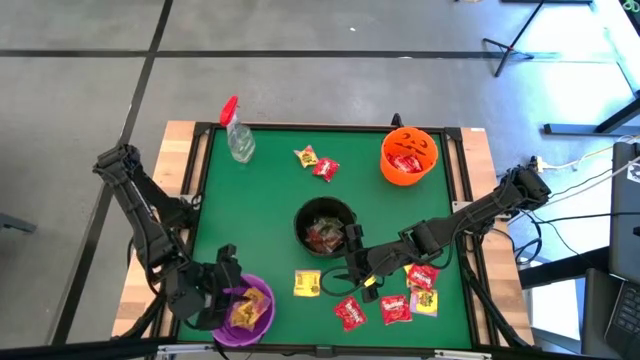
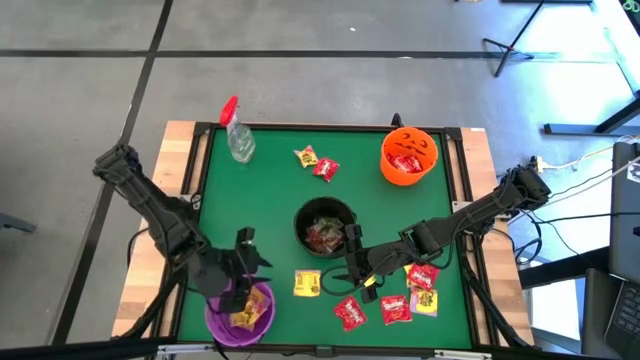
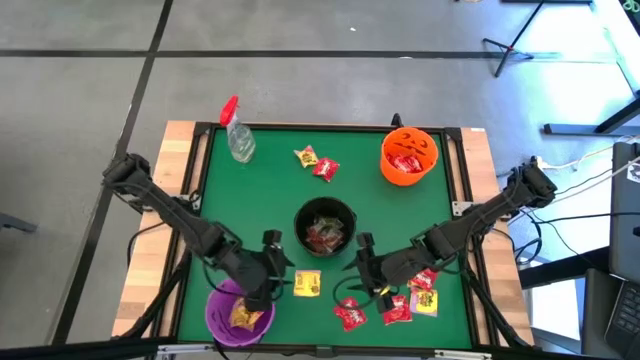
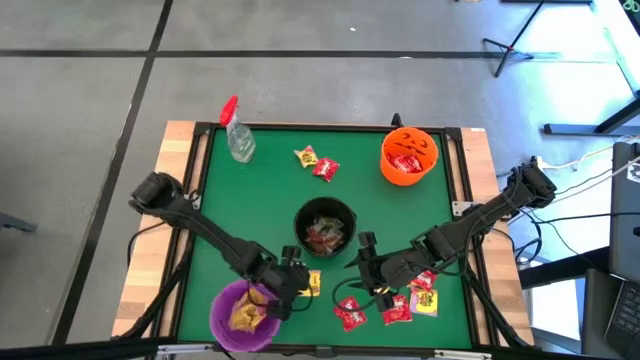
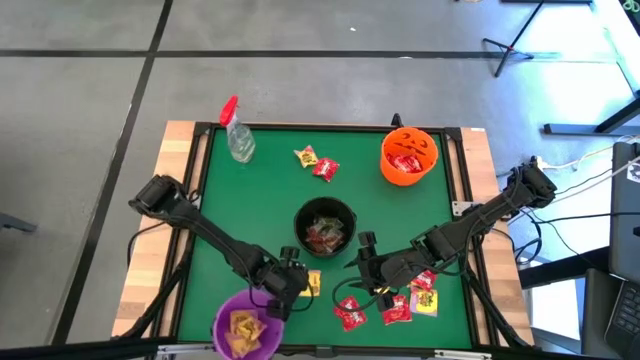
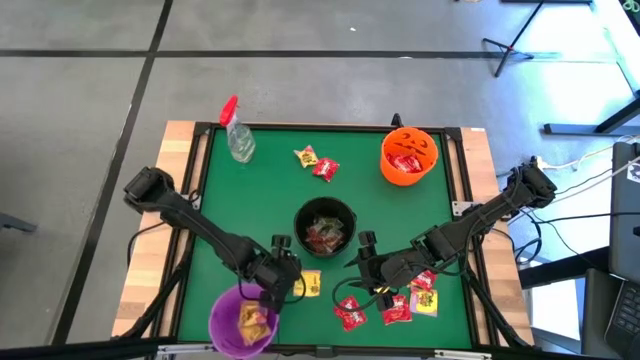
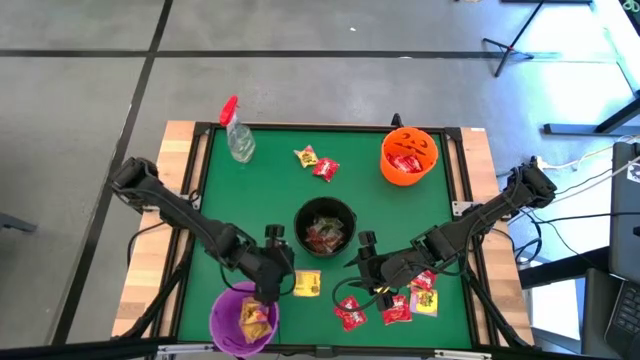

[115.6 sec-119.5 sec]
Task: Sort candy
Put the yellow candy into the purple bucket

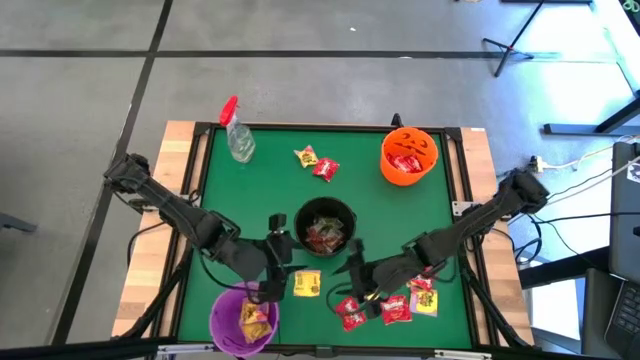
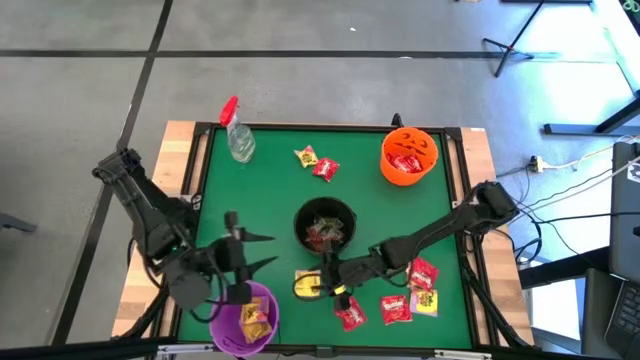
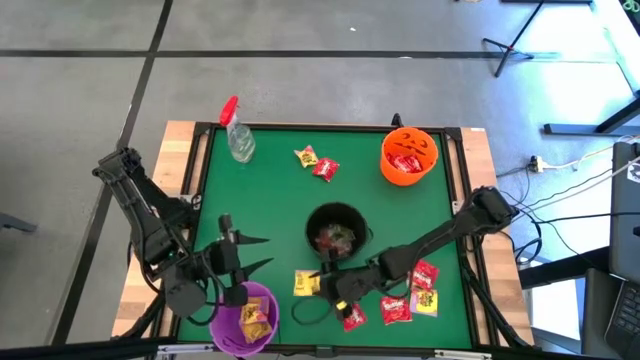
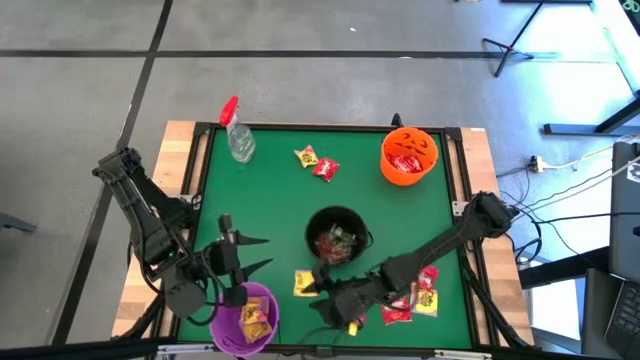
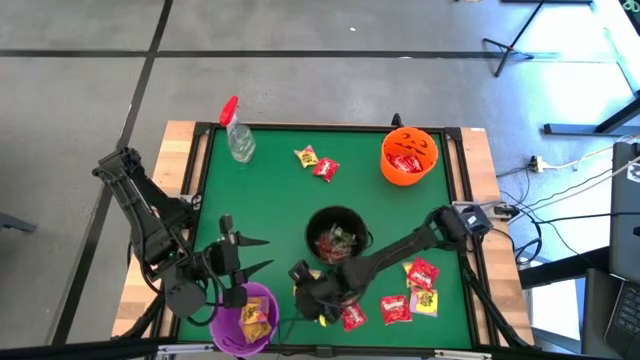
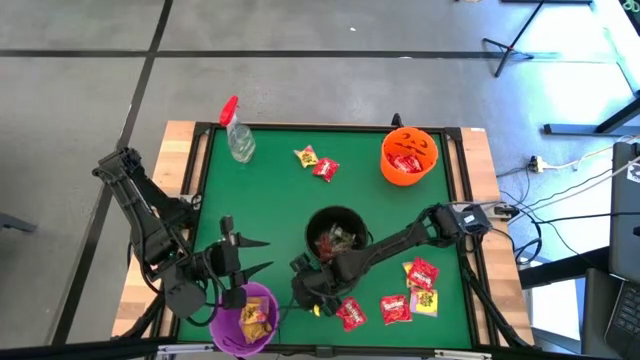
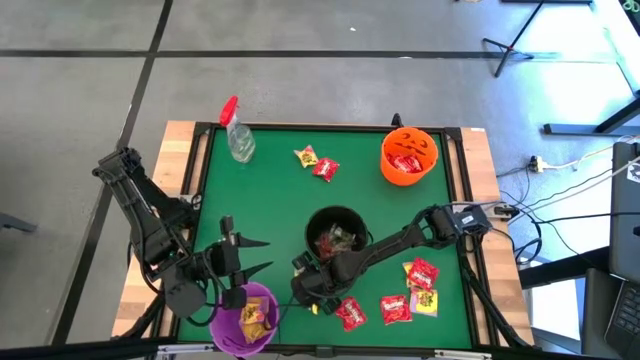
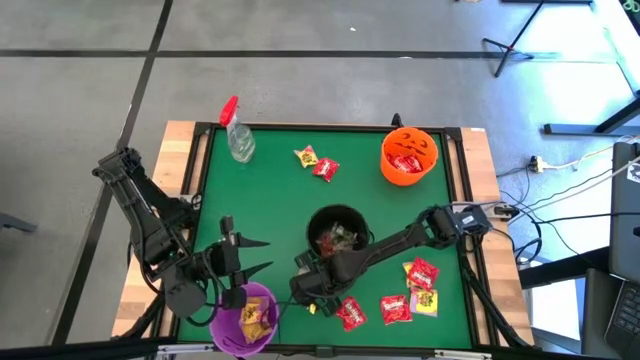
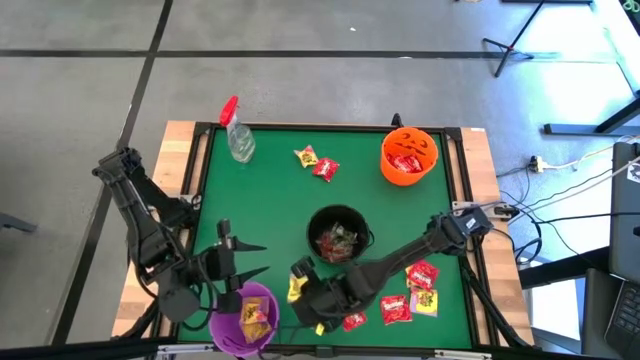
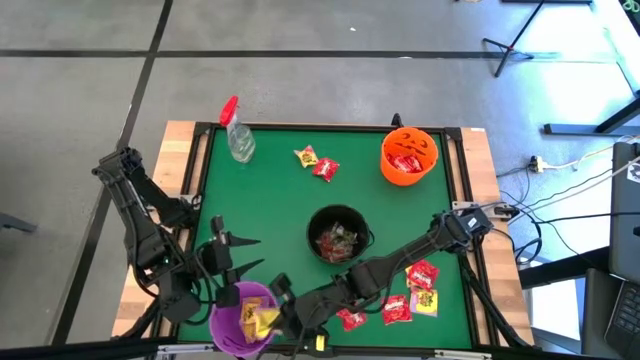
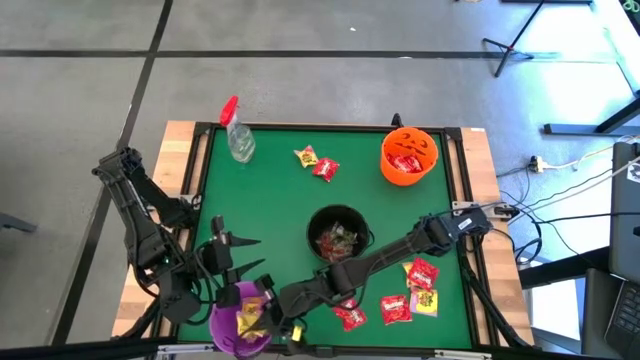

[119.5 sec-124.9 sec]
Put the yellow candy into the purple bucket

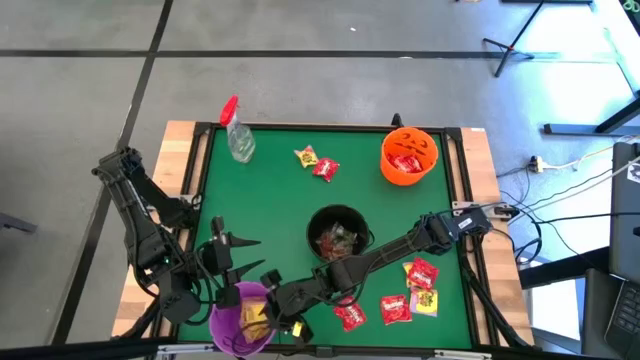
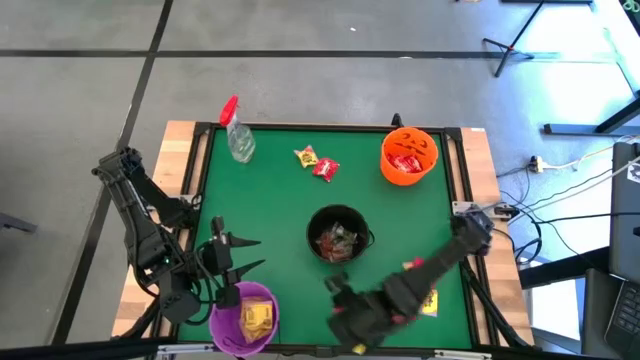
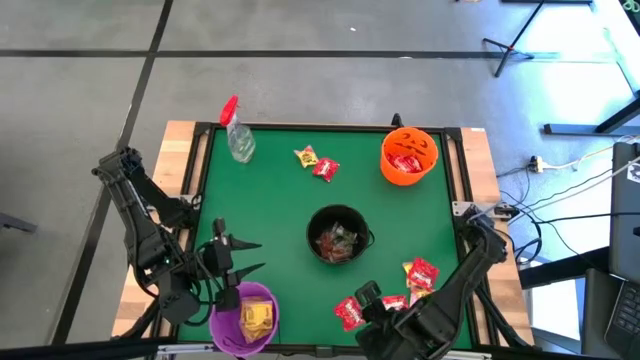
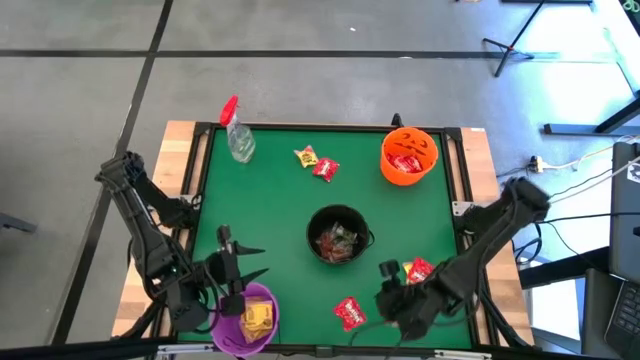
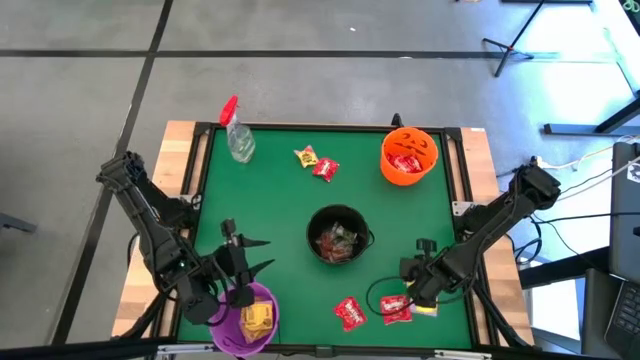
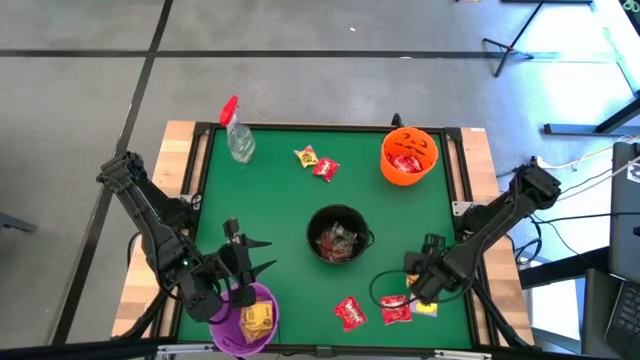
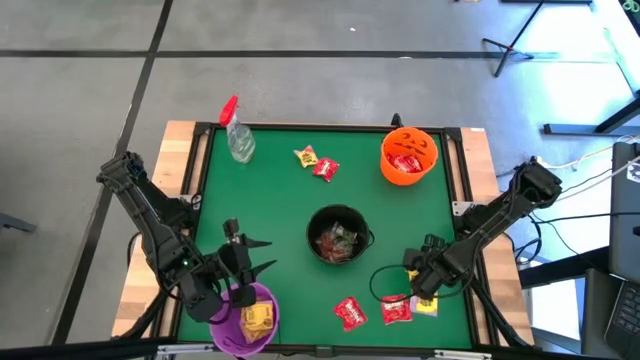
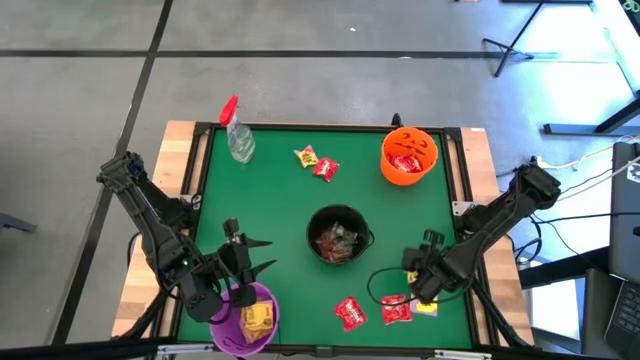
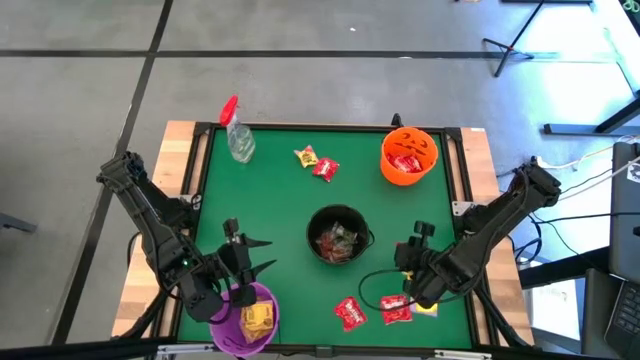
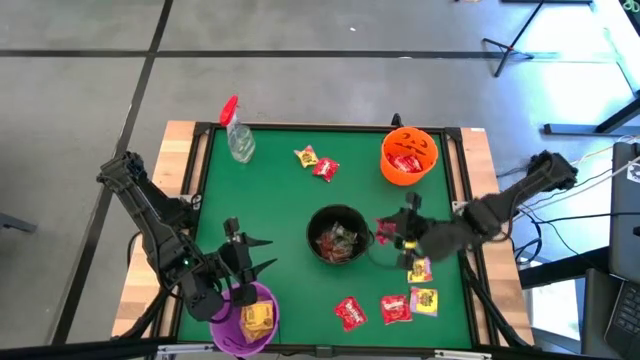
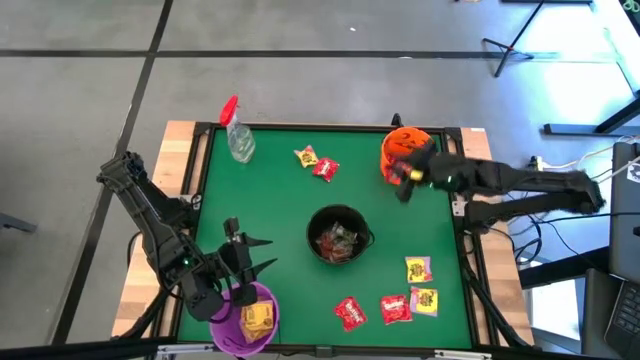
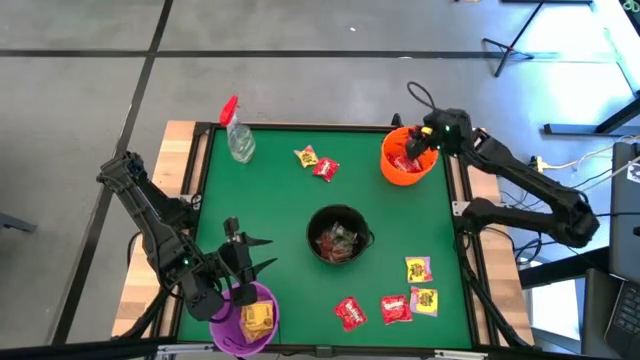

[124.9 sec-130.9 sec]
Put the red candy into the orange bucket

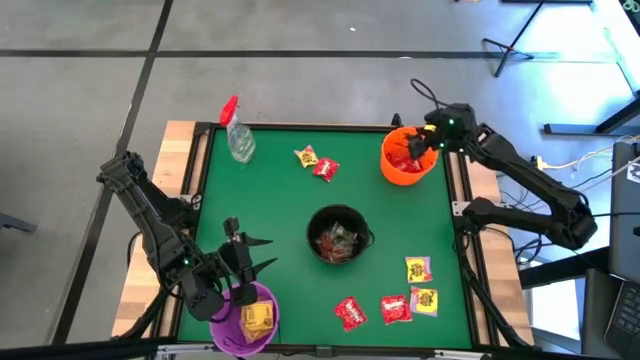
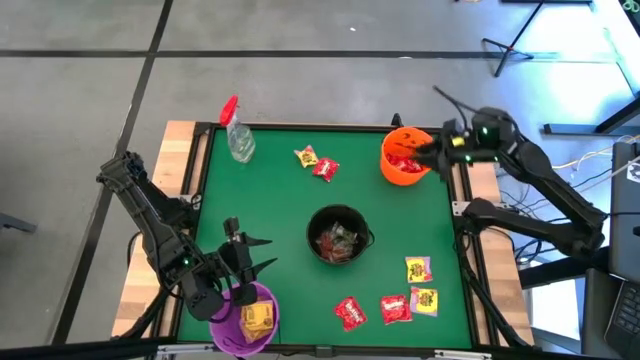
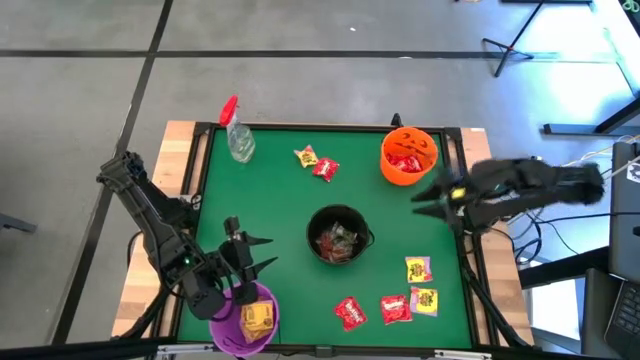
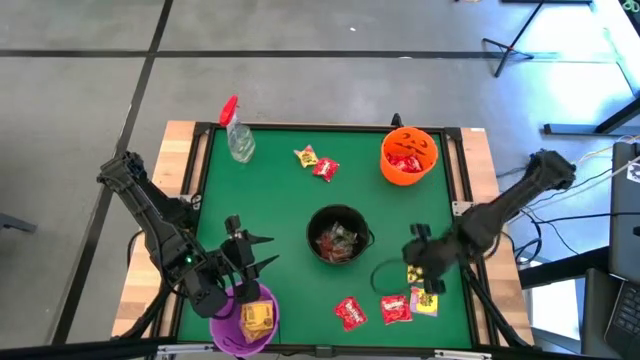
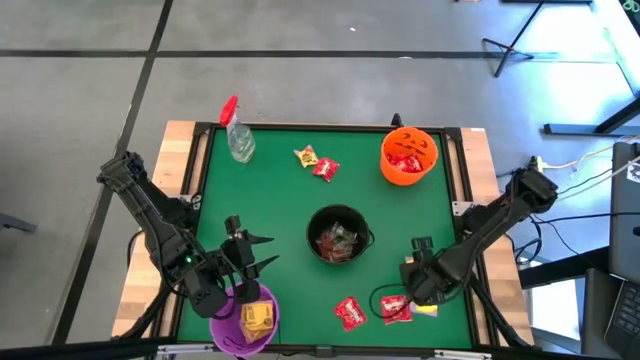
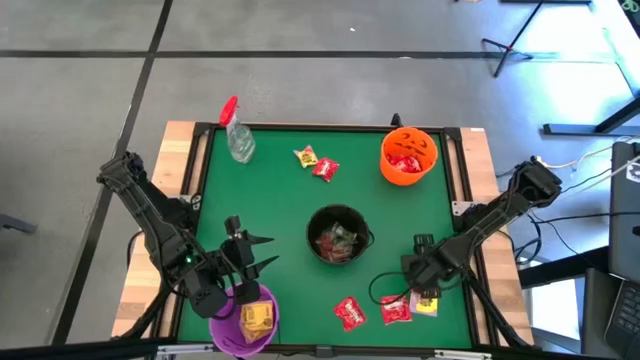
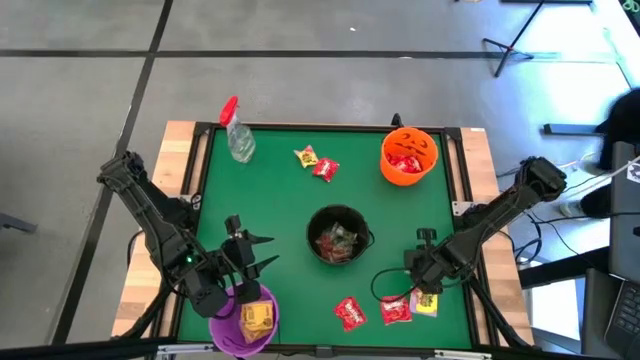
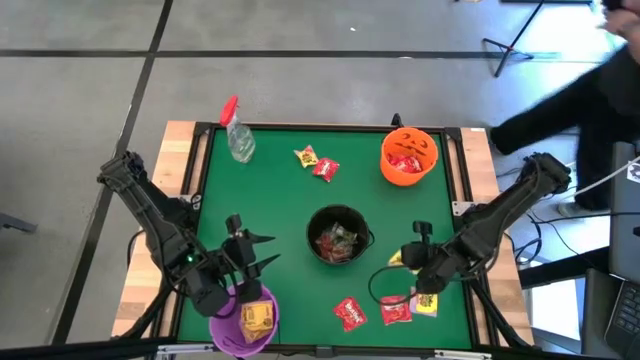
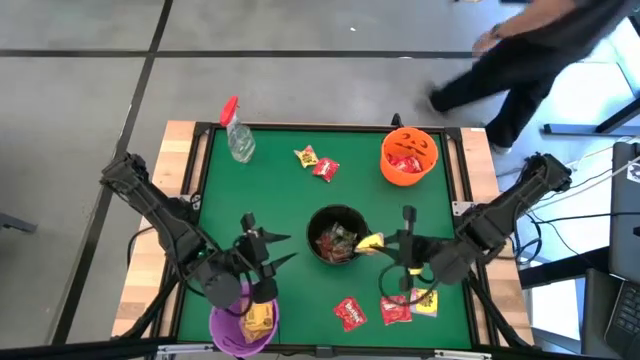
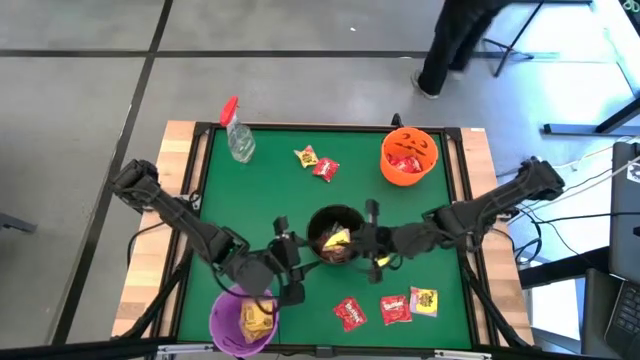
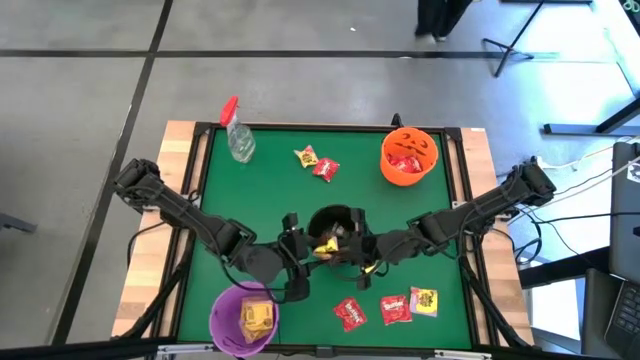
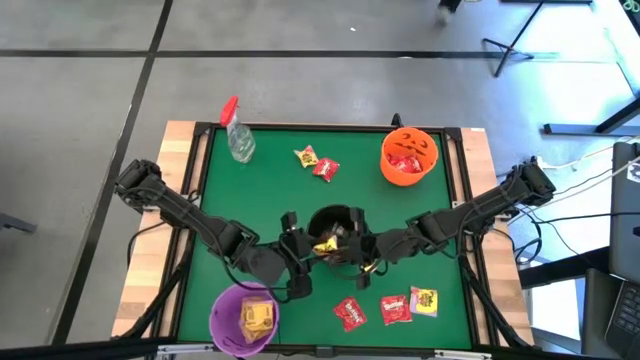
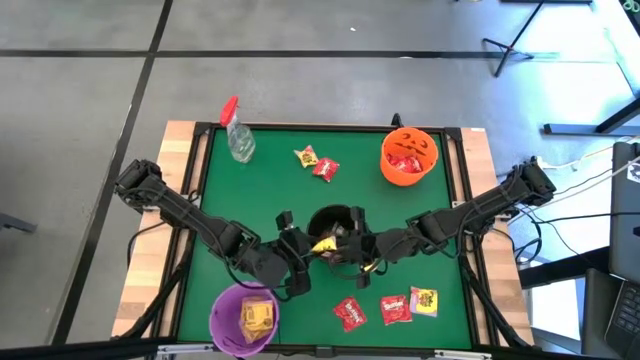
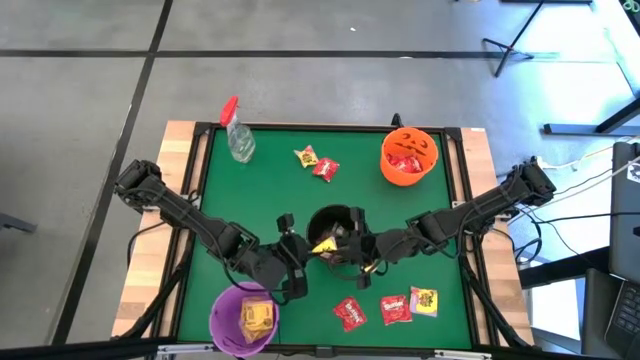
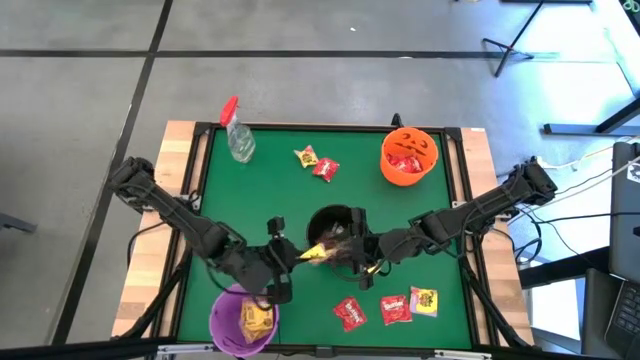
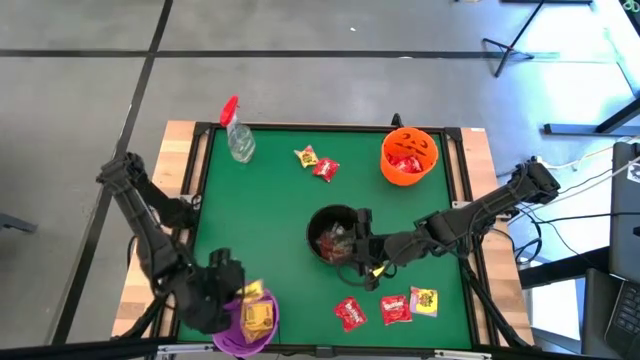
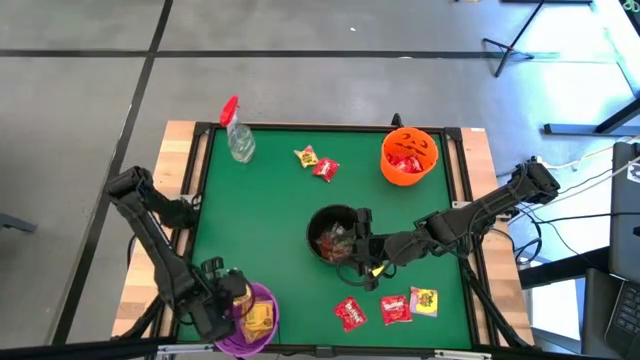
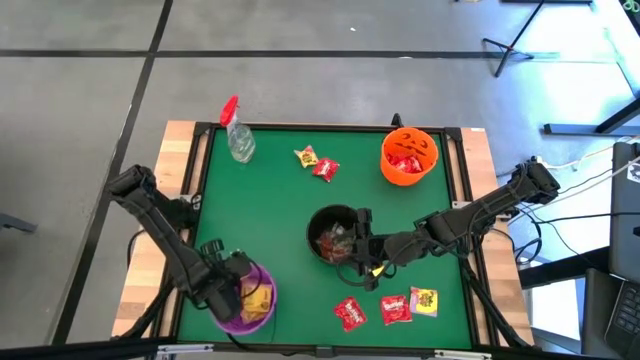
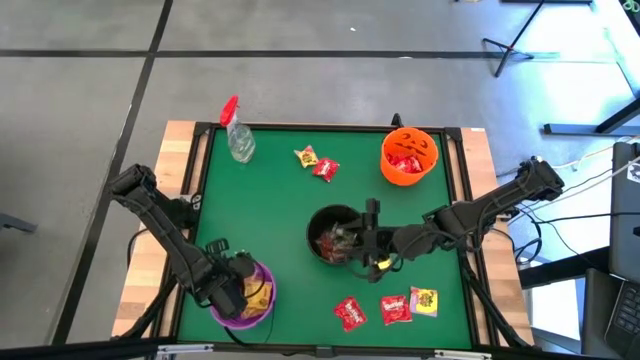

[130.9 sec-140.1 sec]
Put the yellow candy into the purple bucket
